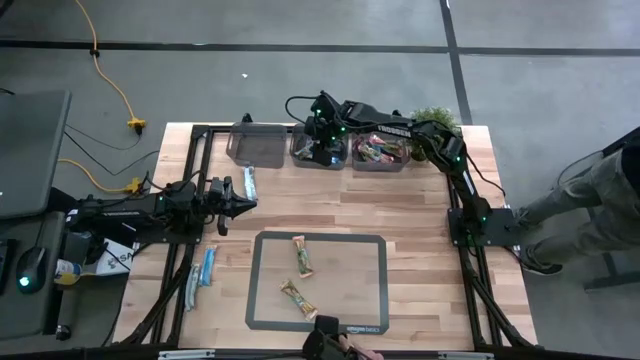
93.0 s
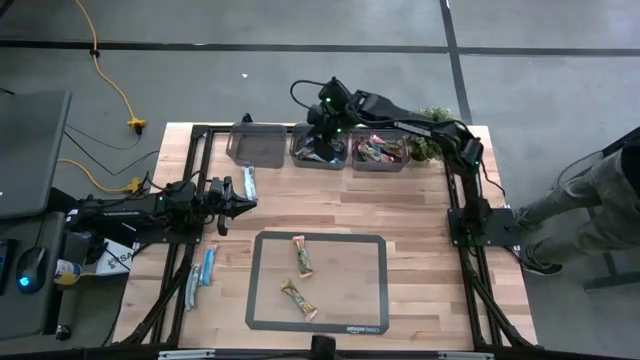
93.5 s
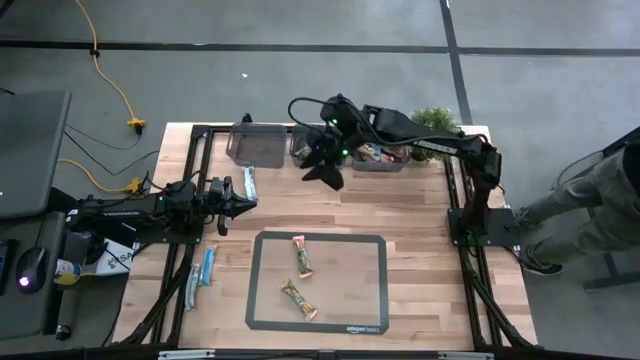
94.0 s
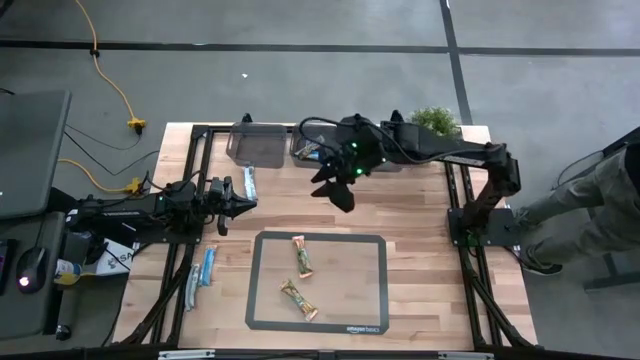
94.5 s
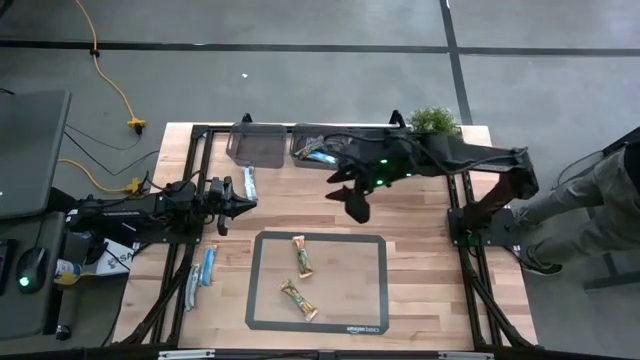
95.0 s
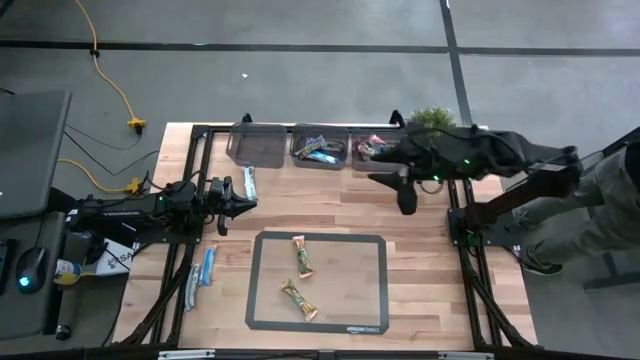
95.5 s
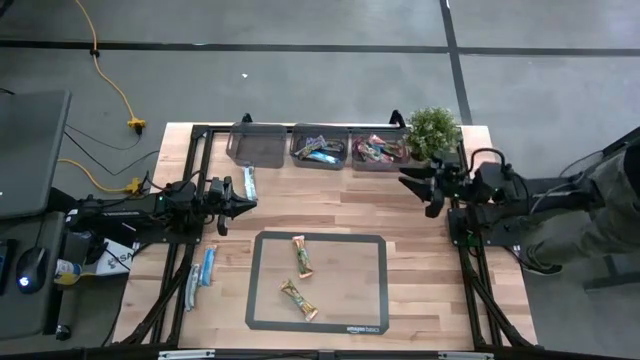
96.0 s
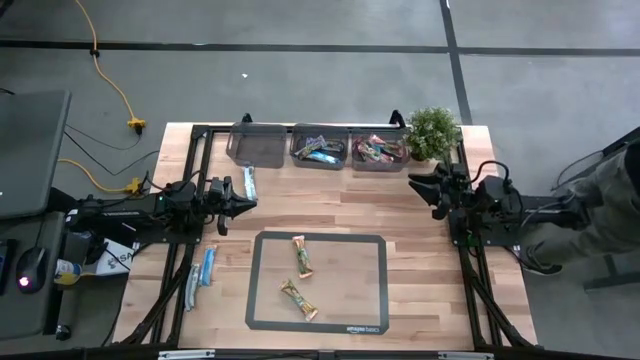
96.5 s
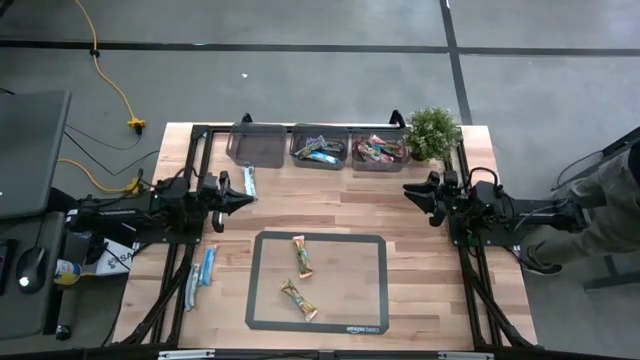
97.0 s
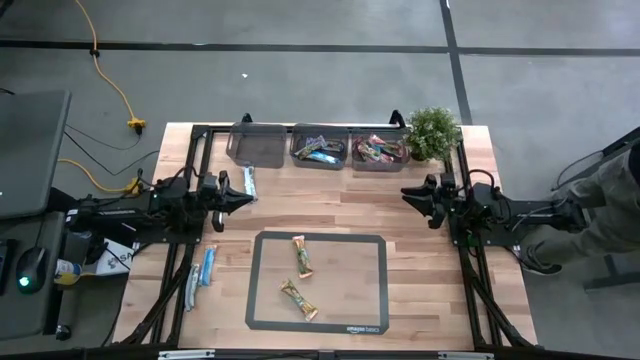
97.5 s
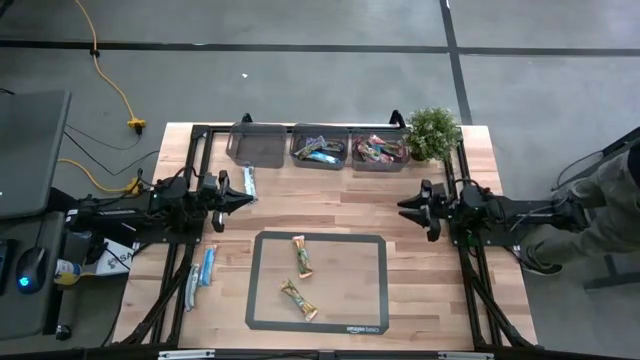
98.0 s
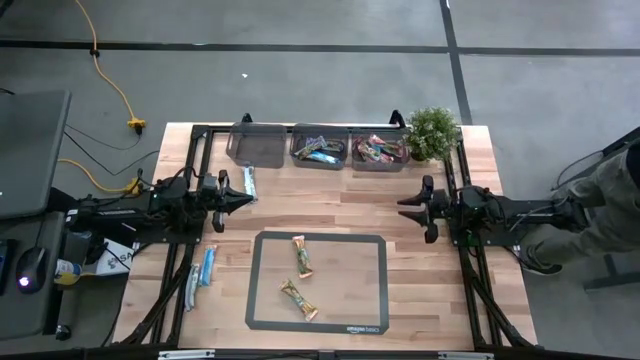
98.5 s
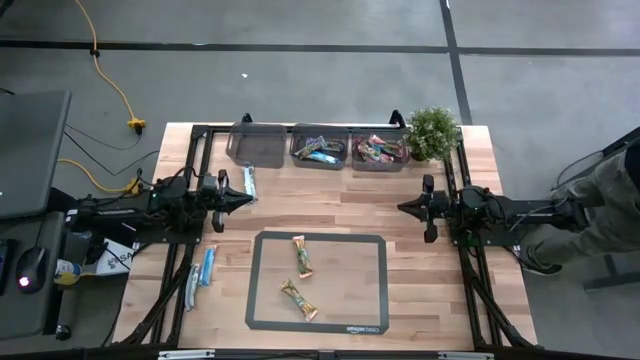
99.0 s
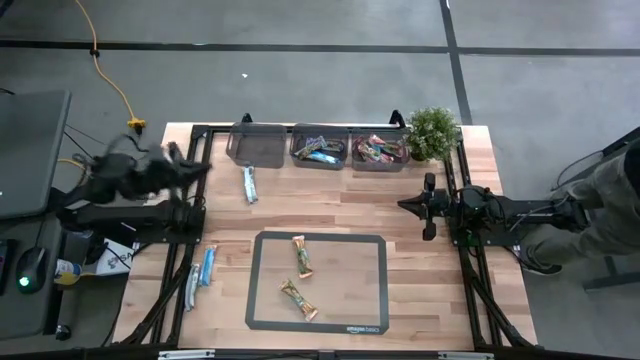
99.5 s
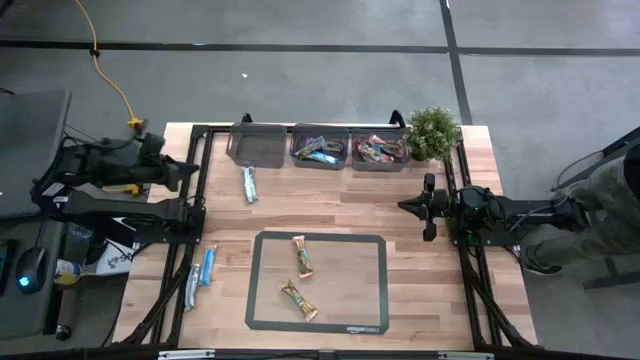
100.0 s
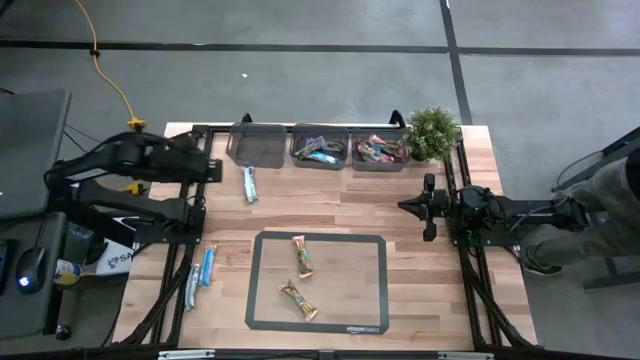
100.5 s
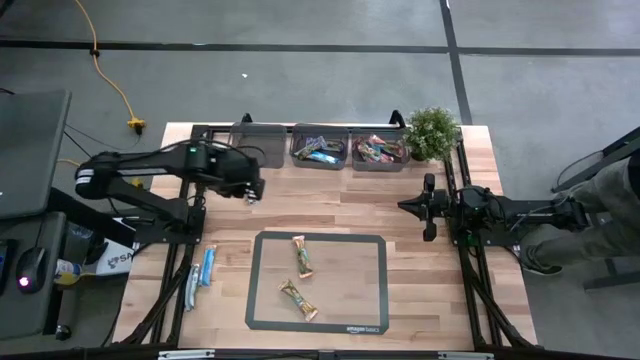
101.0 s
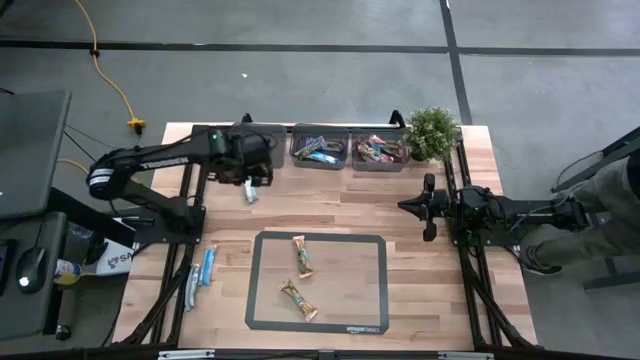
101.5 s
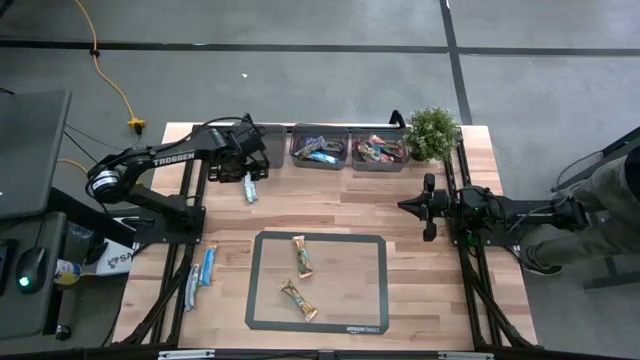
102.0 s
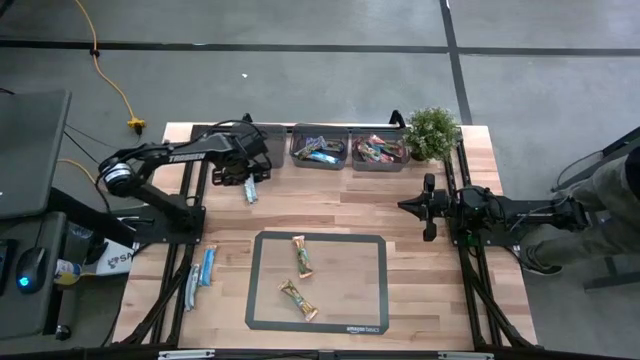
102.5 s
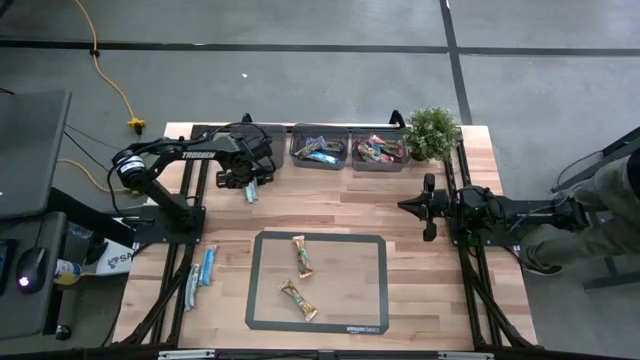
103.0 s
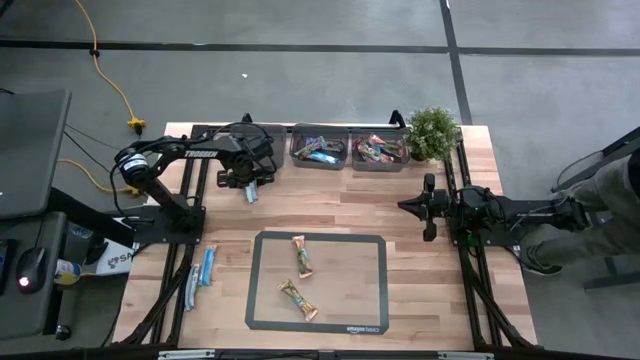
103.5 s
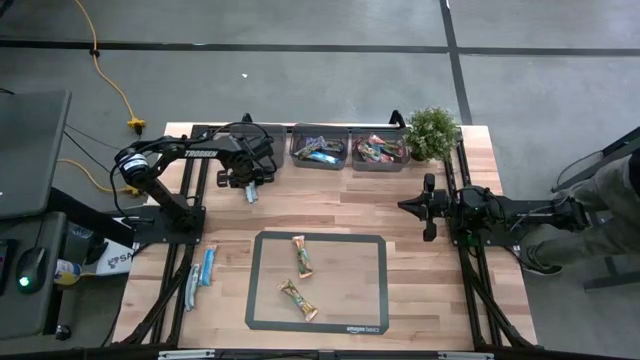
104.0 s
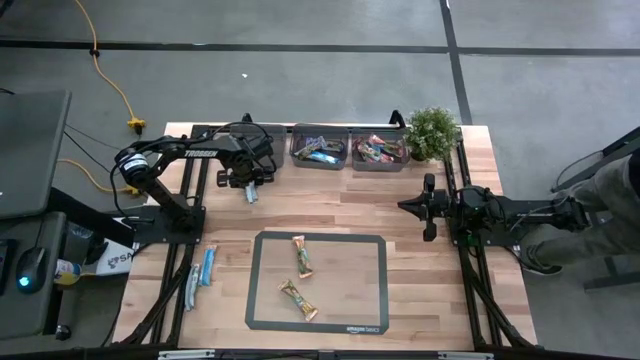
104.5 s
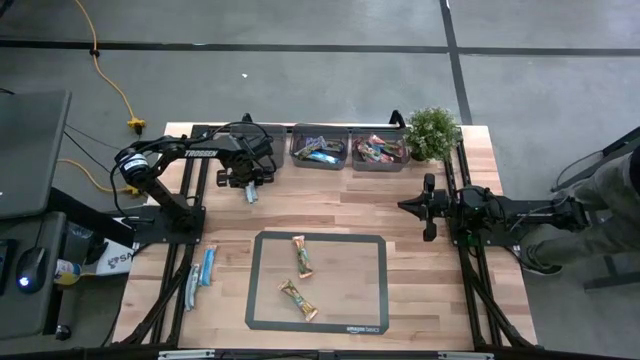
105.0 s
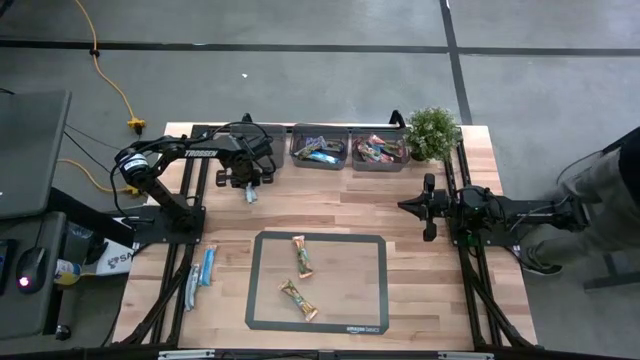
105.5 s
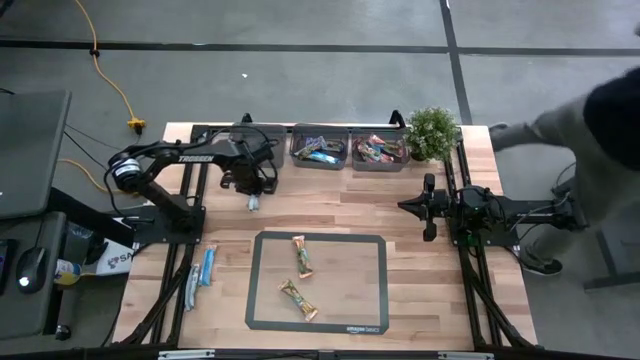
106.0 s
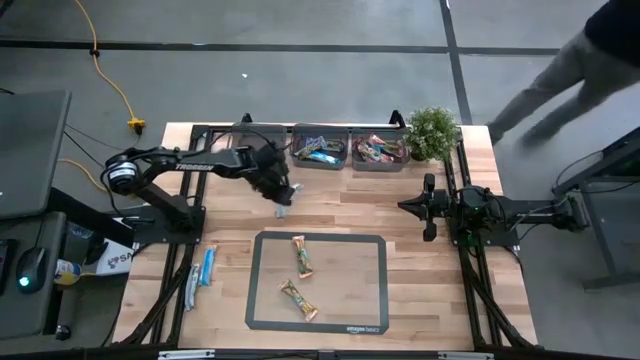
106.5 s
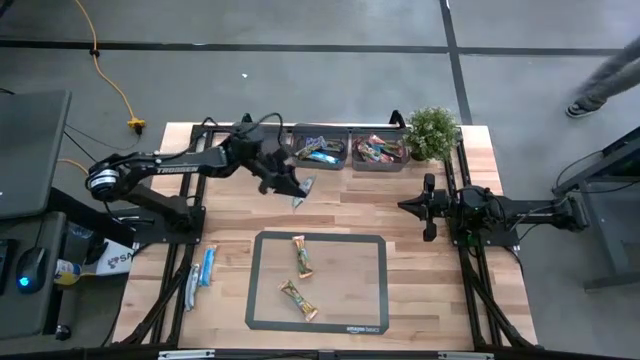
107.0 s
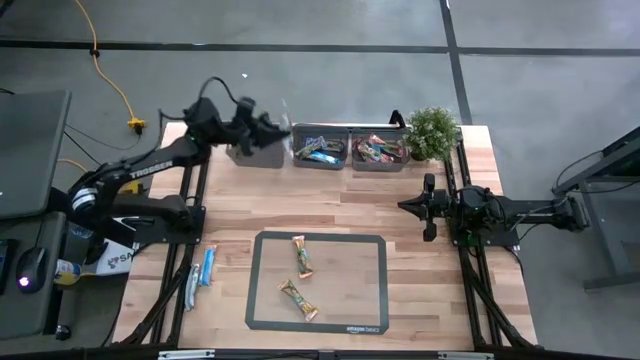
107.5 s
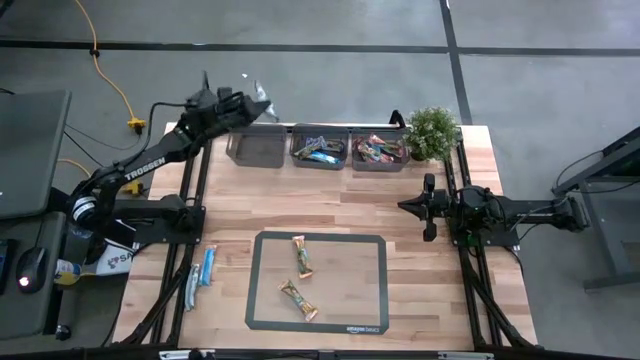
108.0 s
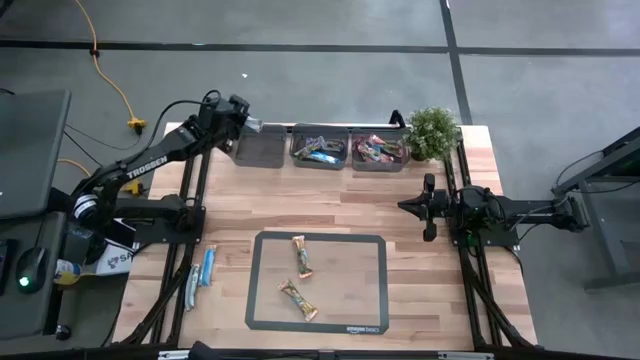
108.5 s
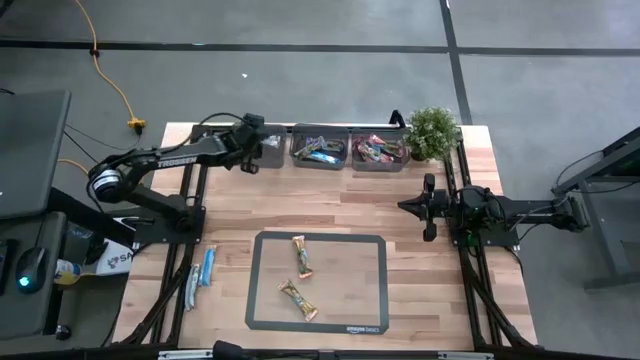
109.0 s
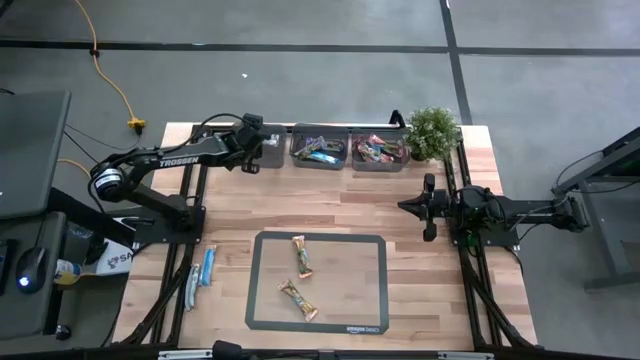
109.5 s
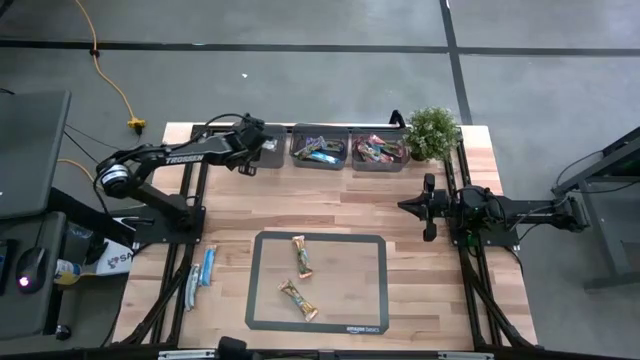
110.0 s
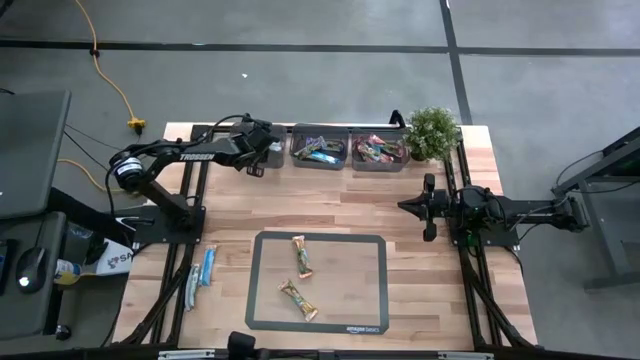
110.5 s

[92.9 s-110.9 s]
Task: Pick and place Granola Bars by type
Put the orange granola bar into the left black bin

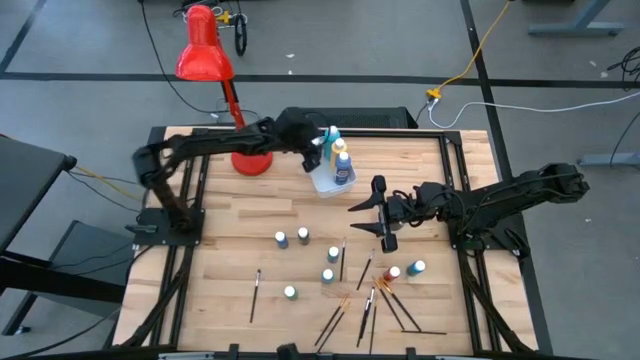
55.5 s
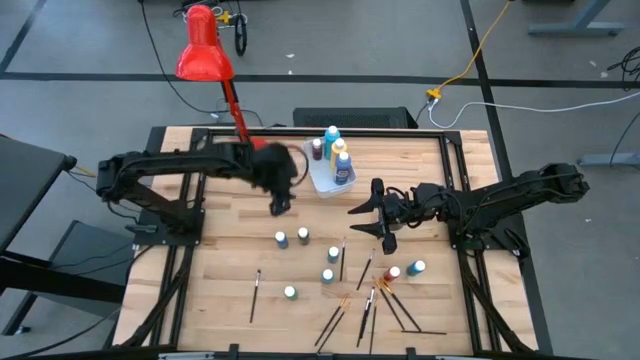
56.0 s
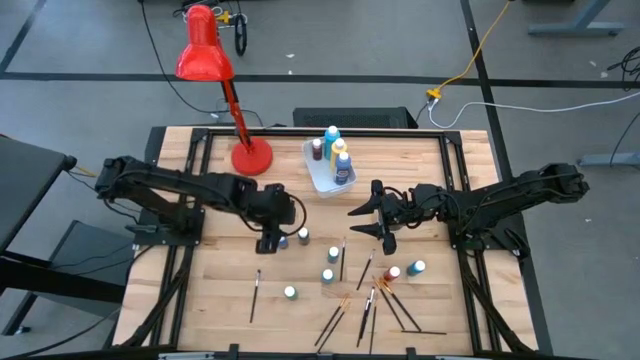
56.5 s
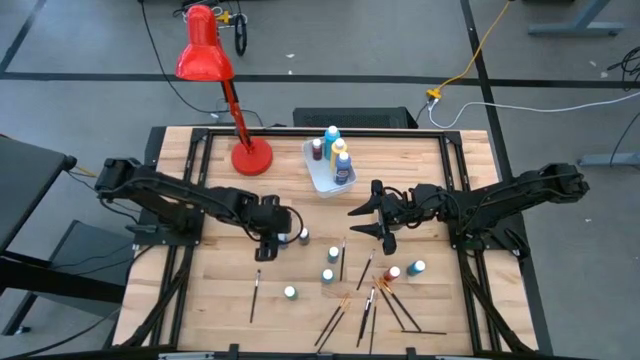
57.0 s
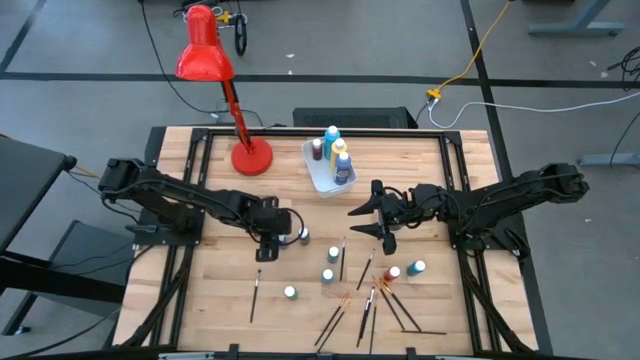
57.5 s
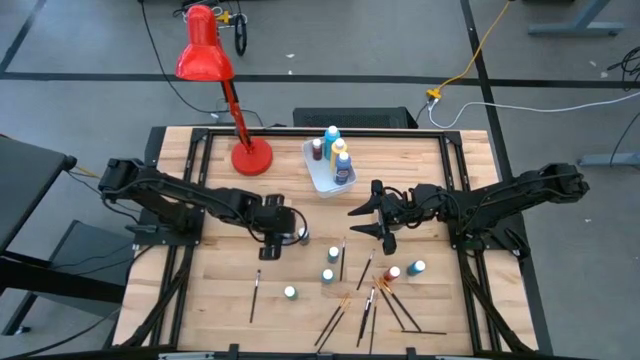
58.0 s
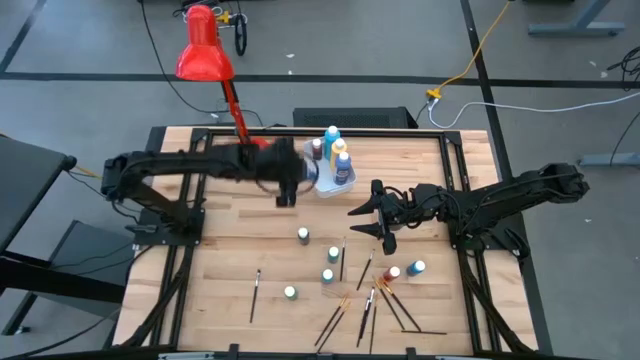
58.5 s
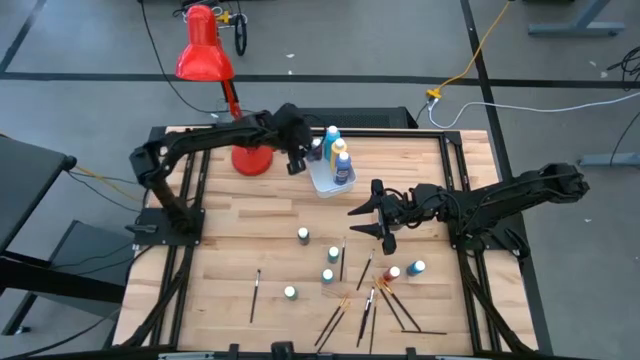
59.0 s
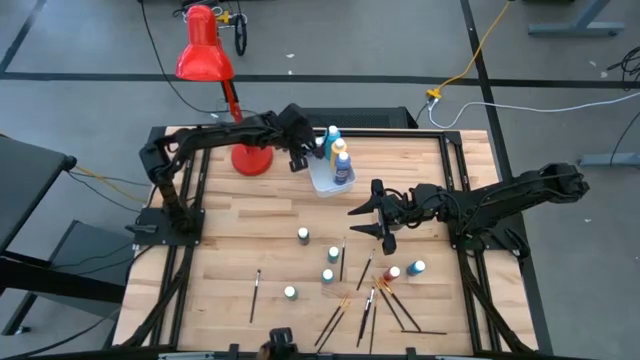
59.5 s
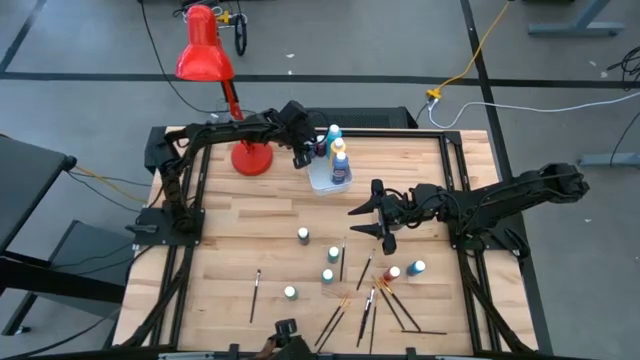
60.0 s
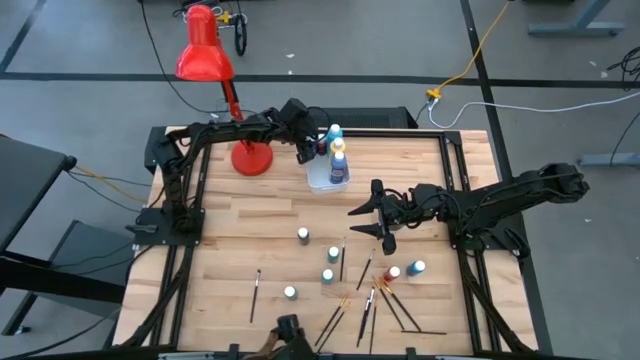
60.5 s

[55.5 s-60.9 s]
Task: Pick & Place Paint Supplies
Put the small blue paint bottle into the white bin
